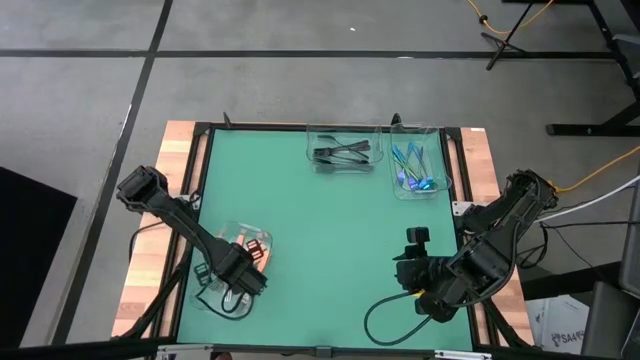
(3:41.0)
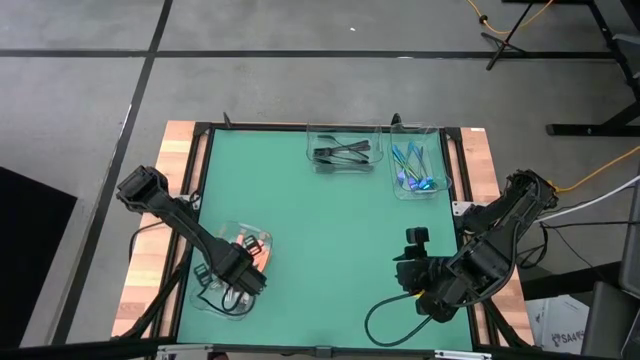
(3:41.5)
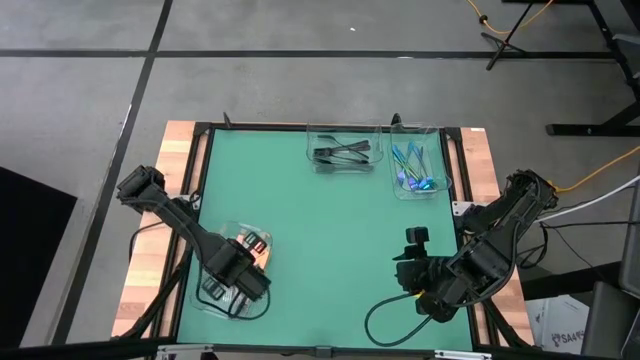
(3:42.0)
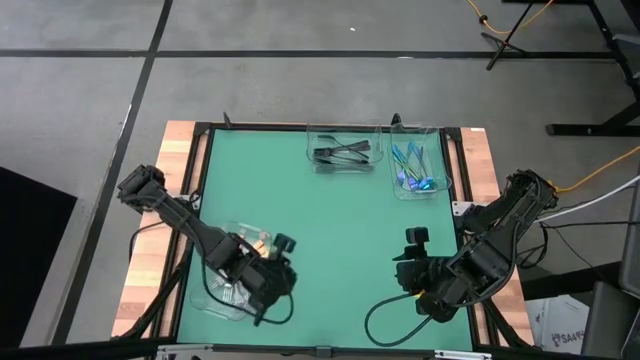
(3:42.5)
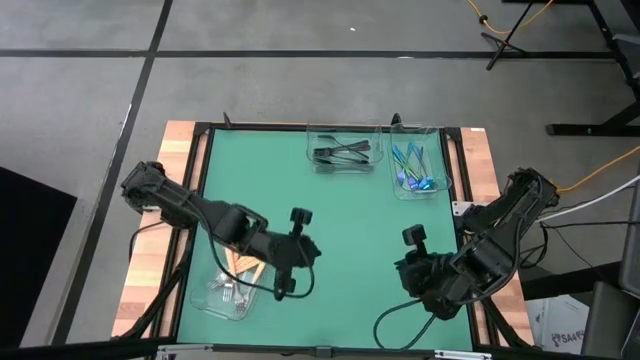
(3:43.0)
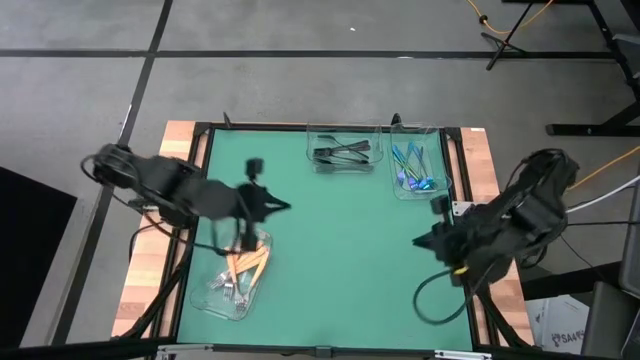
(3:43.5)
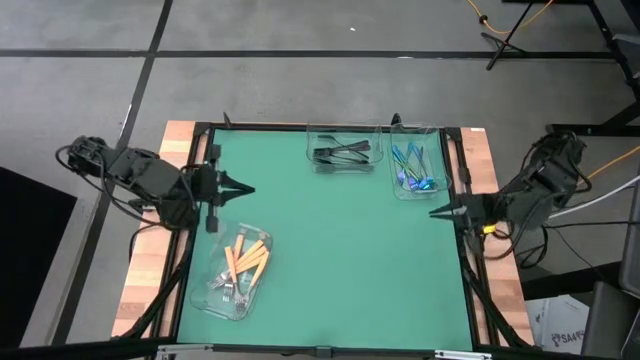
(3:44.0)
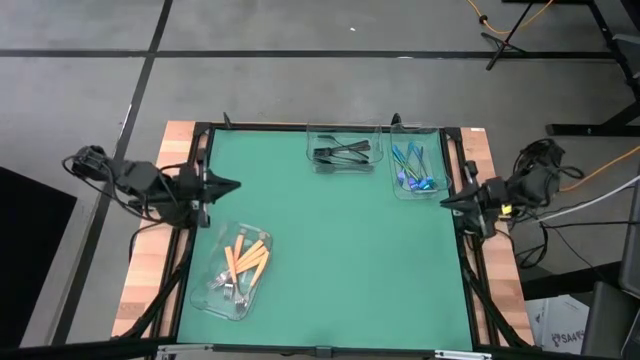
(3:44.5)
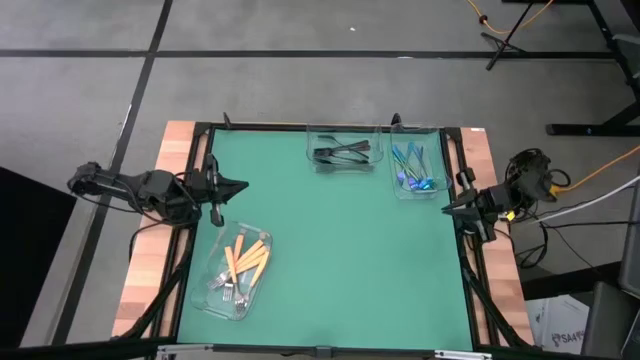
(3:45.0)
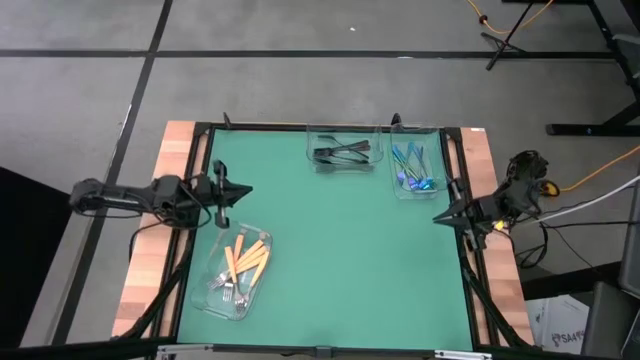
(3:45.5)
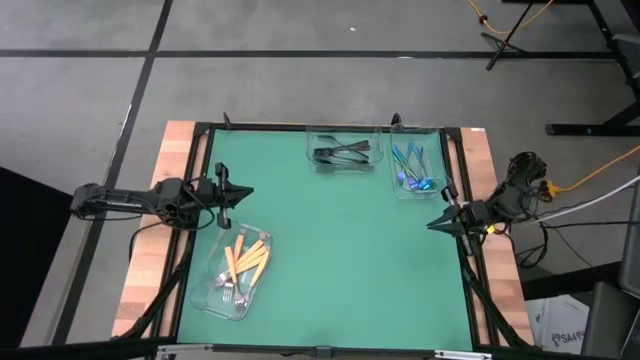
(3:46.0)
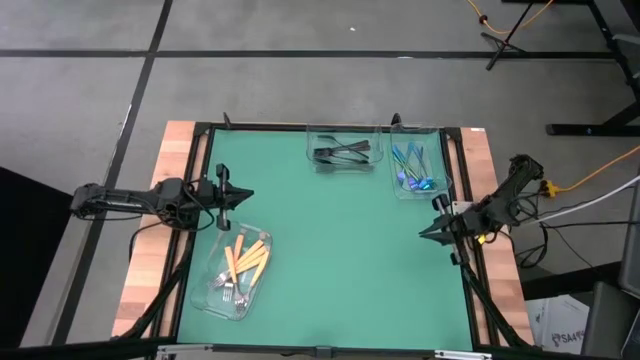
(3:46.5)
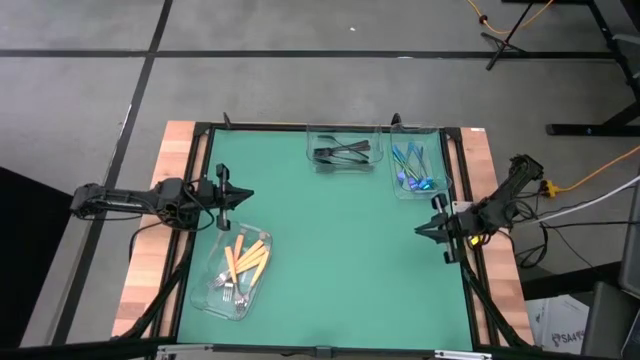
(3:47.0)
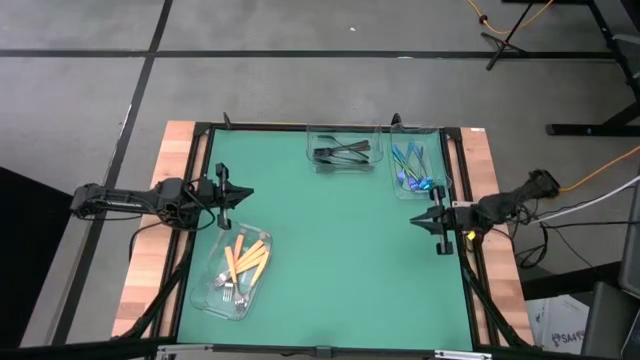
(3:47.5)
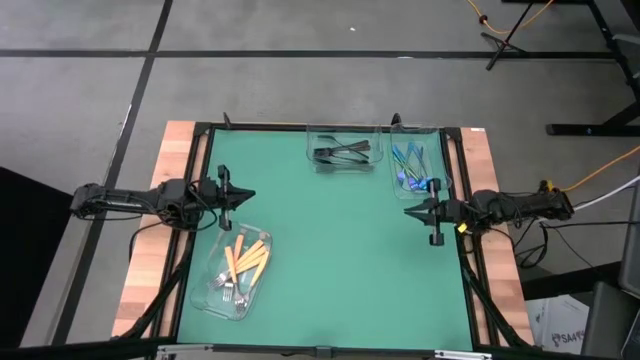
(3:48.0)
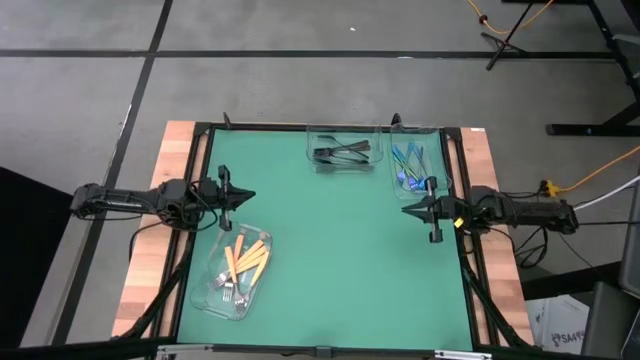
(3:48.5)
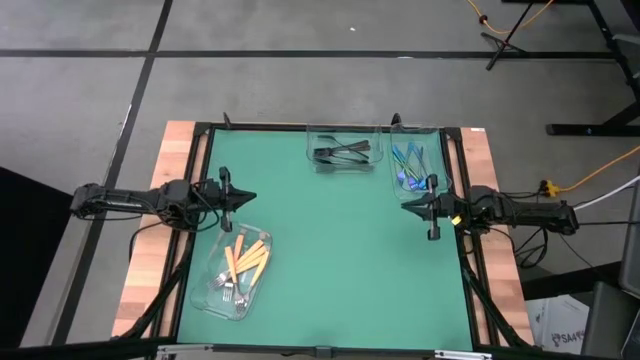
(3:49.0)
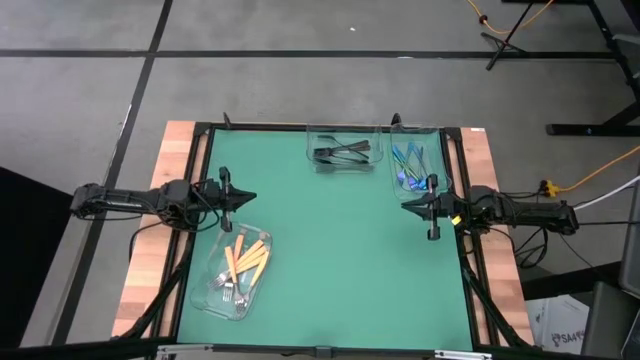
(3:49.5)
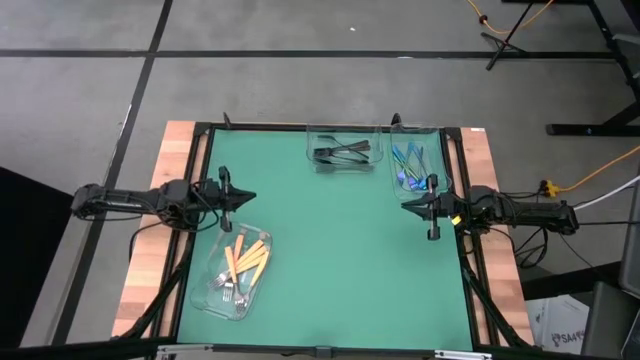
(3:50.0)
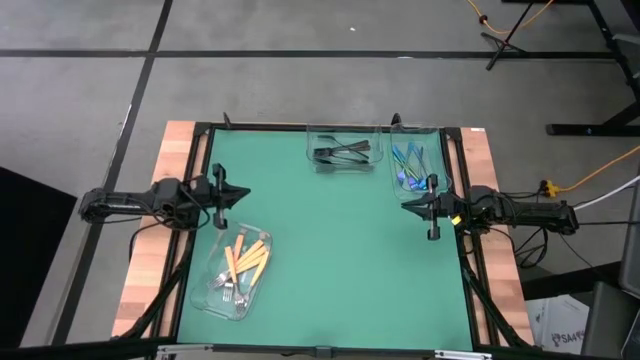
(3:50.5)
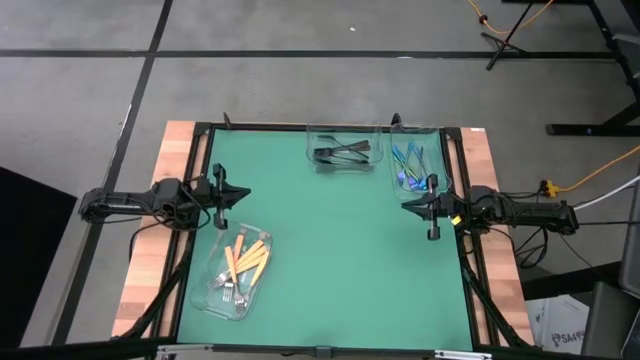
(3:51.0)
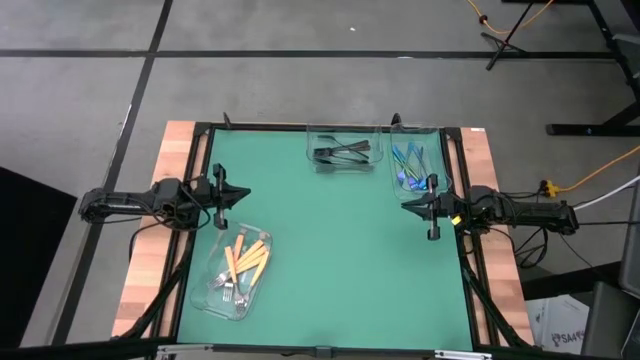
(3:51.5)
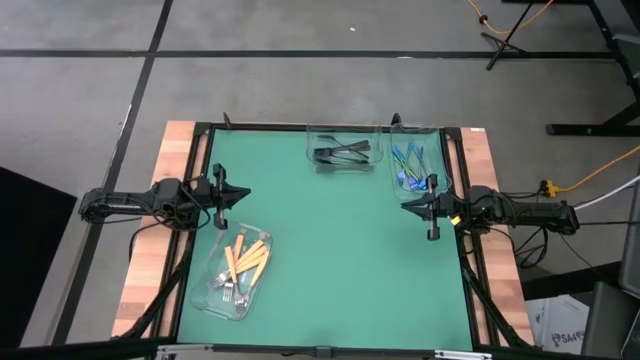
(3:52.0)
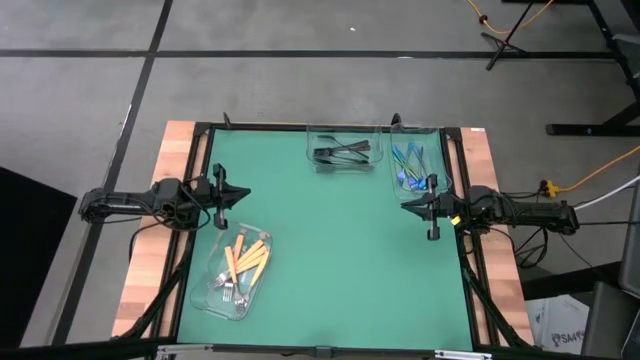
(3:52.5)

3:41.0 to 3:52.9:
Task: Sort silverware by color (type)
Return to Home Position

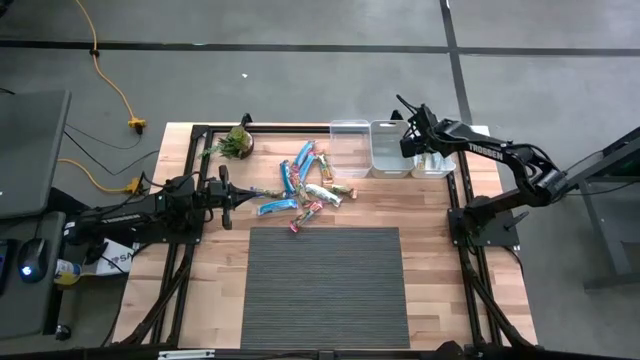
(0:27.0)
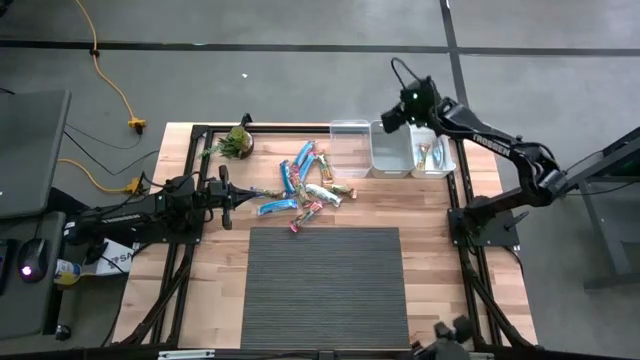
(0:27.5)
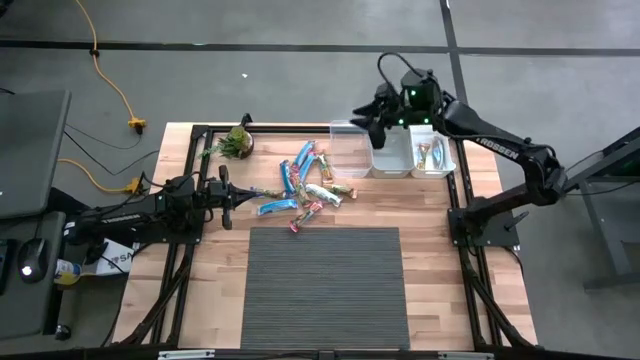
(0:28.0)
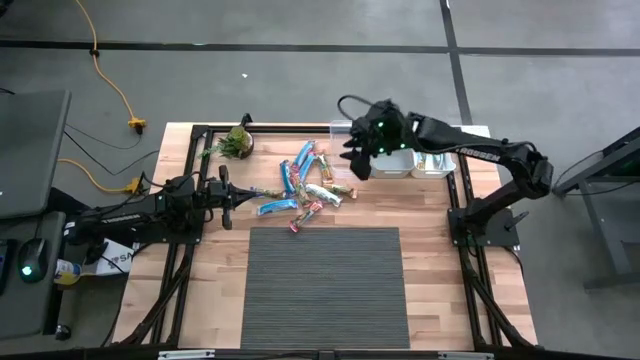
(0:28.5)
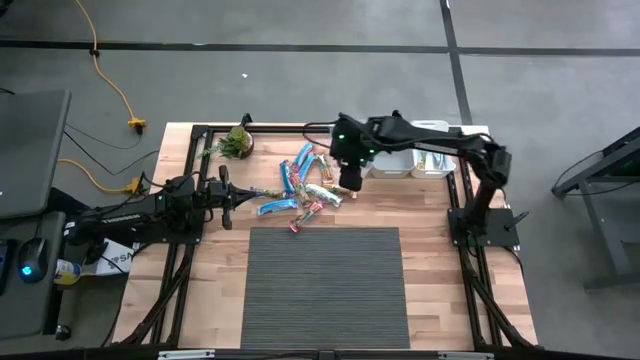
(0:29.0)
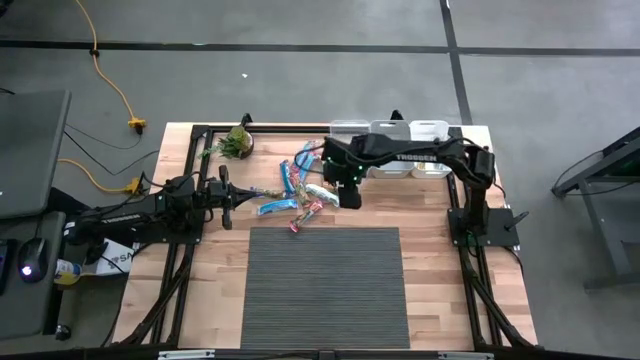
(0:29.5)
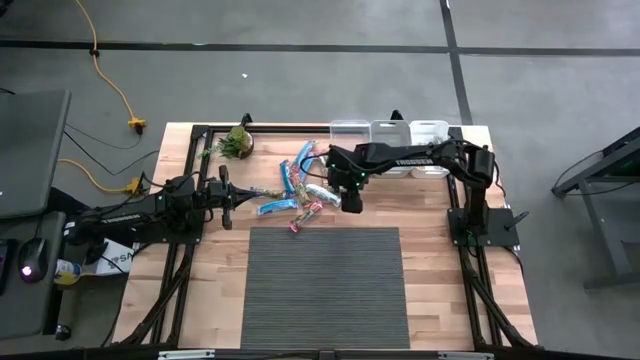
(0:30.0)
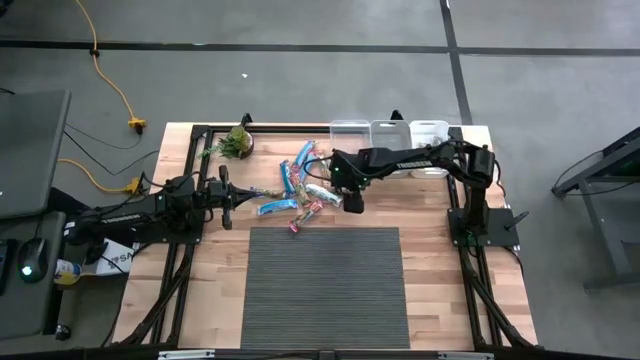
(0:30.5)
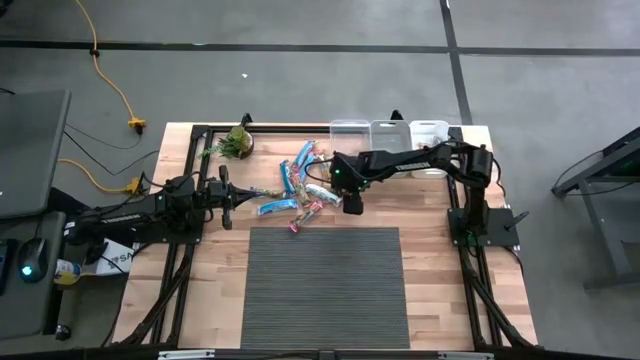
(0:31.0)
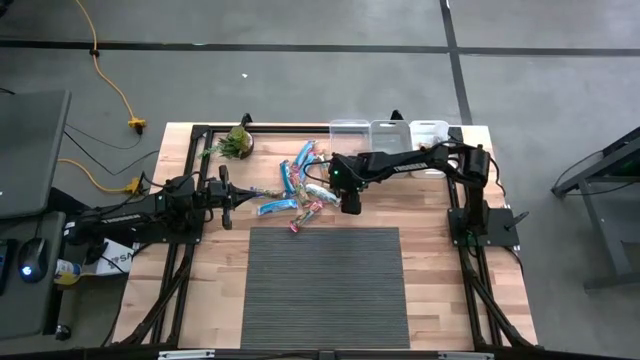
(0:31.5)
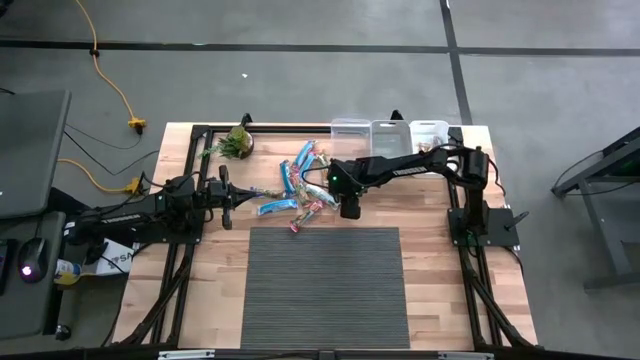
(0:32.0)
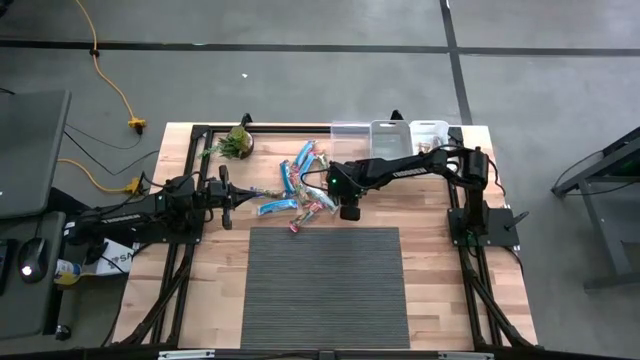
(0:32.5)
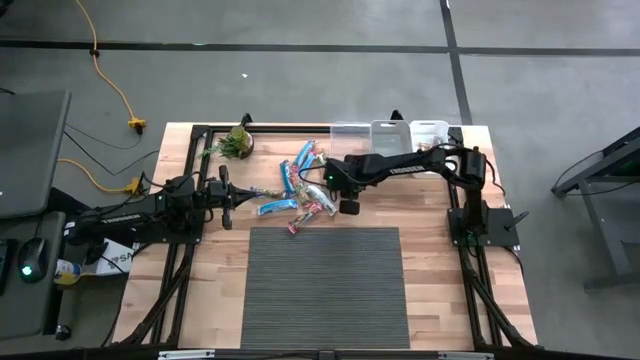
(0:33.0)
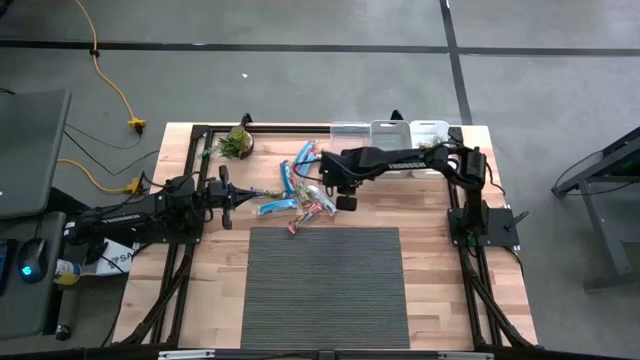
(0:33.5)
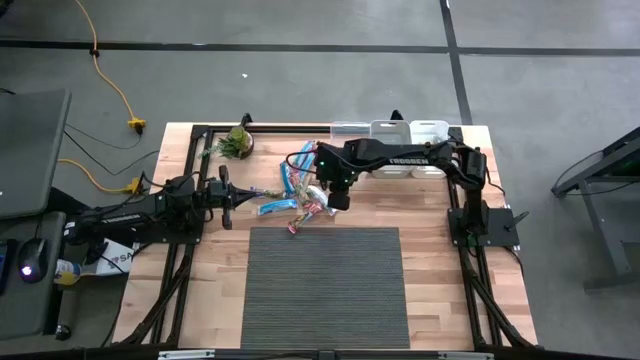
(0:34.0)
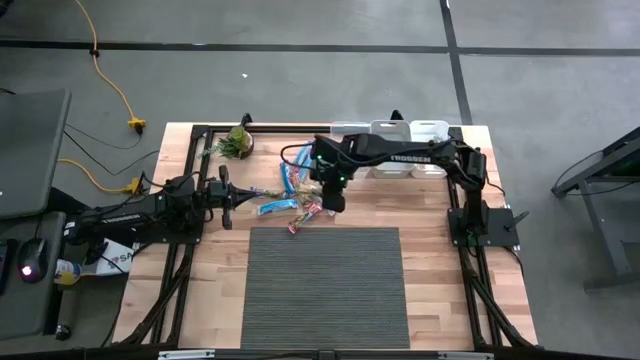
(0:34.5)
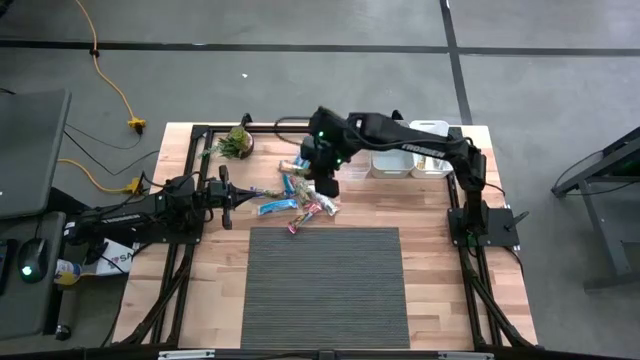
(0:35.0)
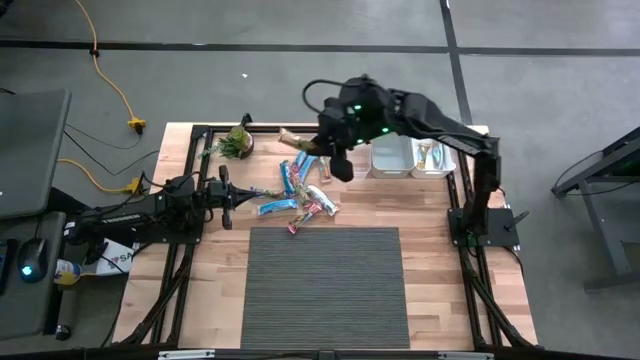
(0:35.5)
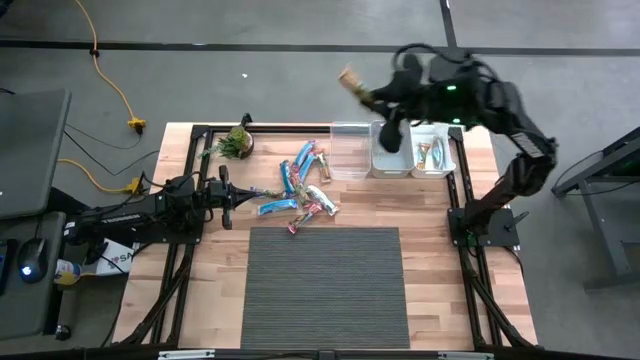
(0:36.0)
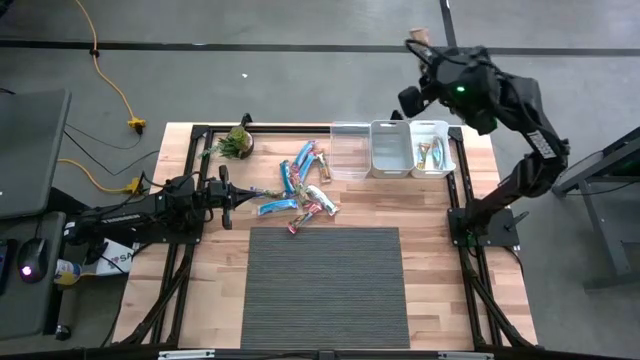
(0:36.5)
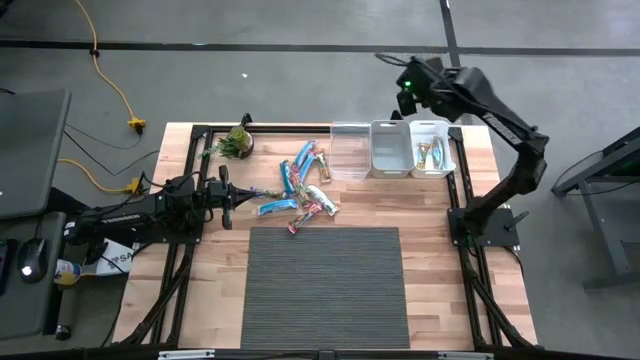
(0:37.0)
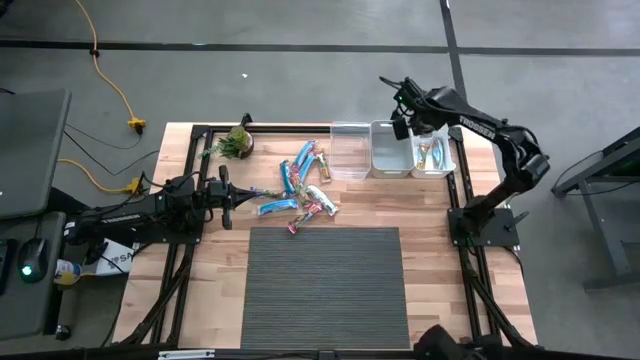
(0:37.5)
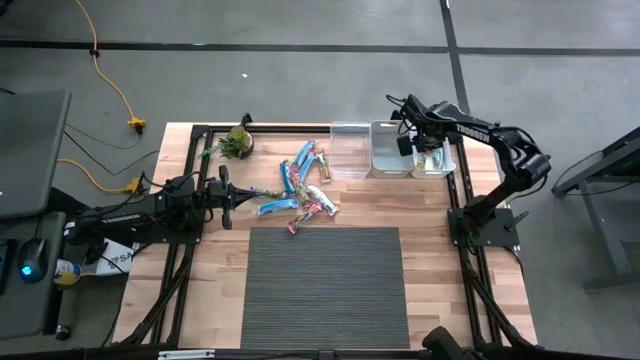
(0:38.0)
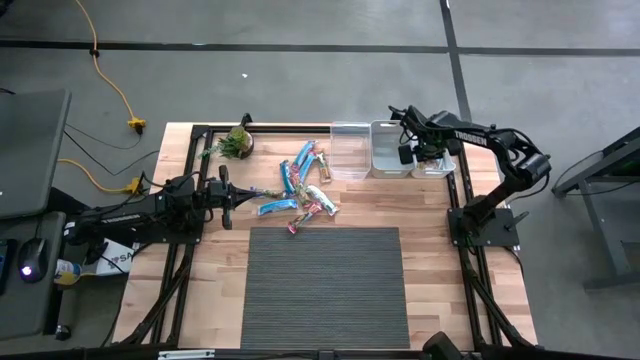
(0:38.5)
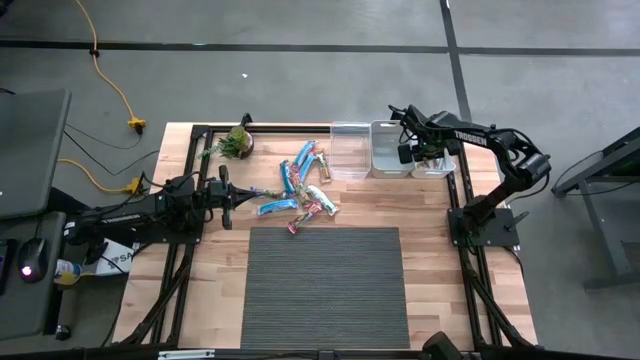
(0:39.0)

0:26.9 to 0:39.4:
Task: Pick and place Granola Bars by type
Put the yellow granola bar into the white bin
